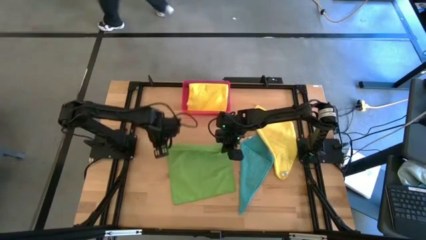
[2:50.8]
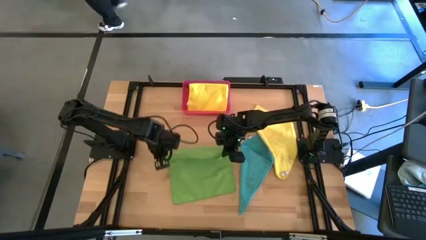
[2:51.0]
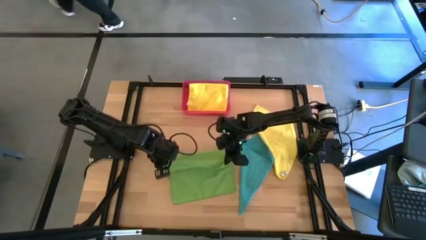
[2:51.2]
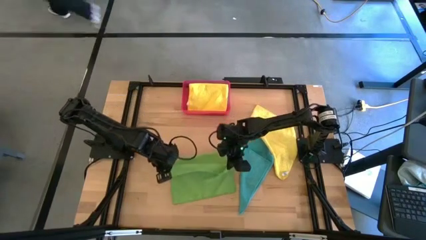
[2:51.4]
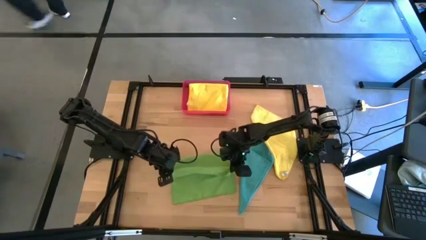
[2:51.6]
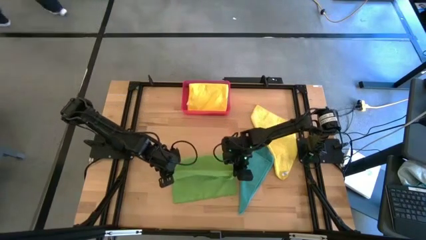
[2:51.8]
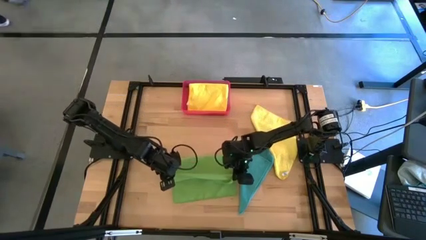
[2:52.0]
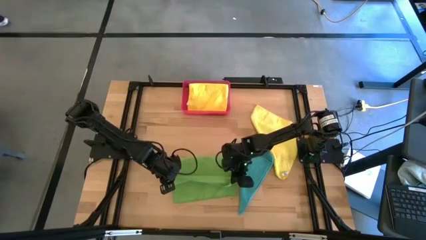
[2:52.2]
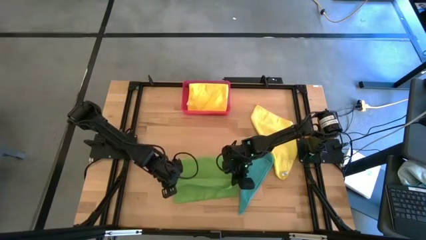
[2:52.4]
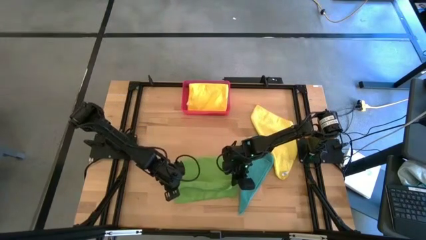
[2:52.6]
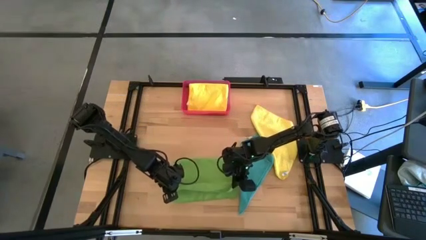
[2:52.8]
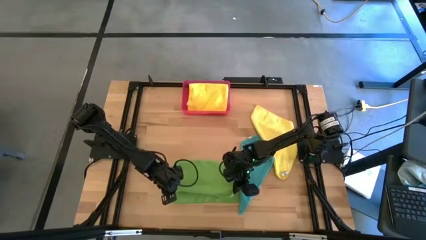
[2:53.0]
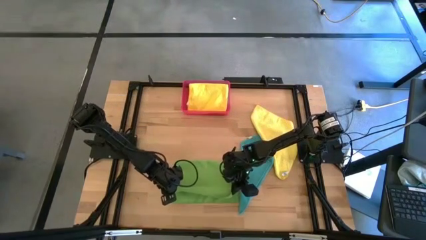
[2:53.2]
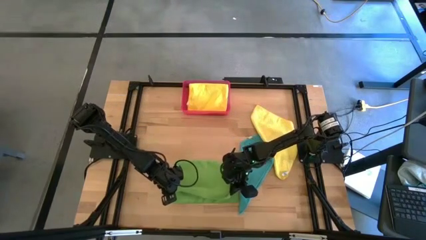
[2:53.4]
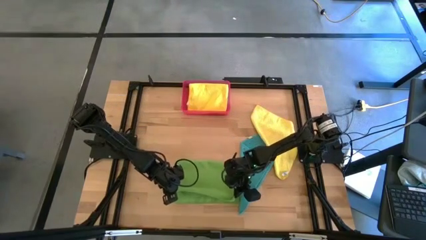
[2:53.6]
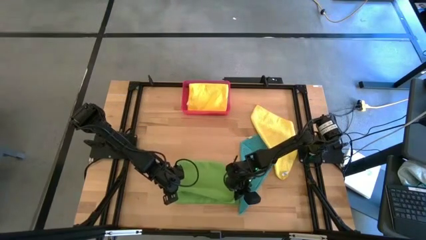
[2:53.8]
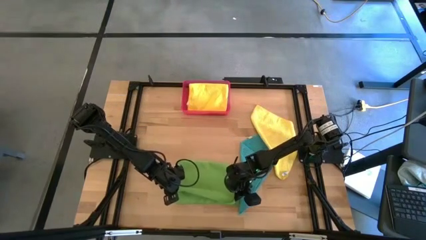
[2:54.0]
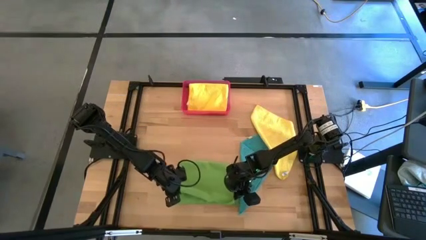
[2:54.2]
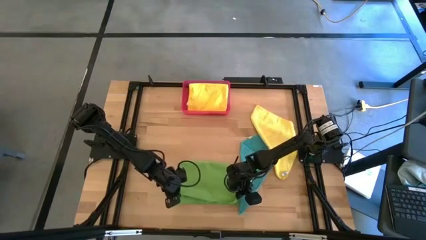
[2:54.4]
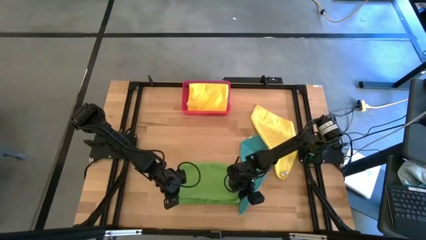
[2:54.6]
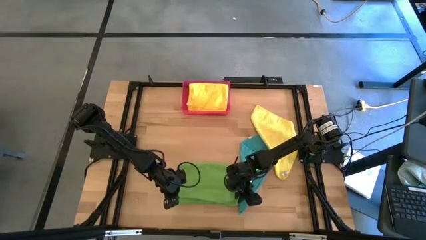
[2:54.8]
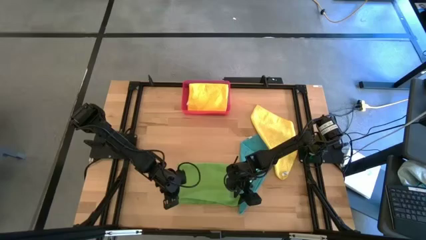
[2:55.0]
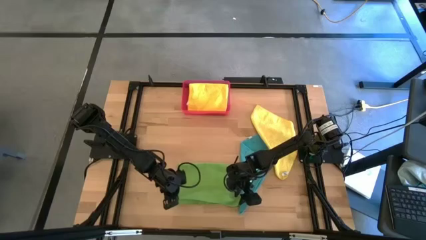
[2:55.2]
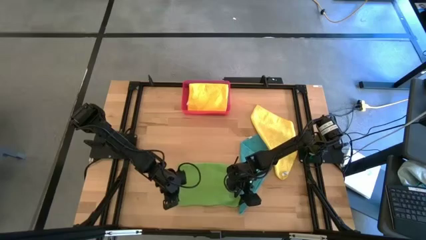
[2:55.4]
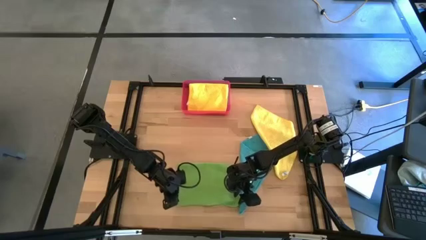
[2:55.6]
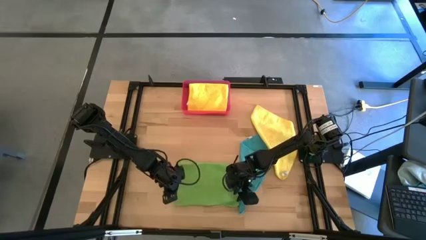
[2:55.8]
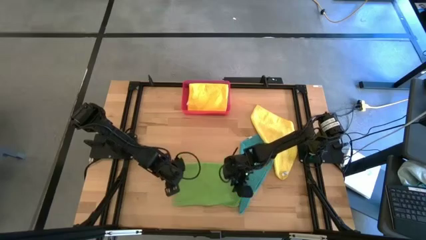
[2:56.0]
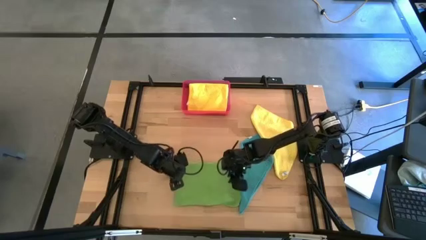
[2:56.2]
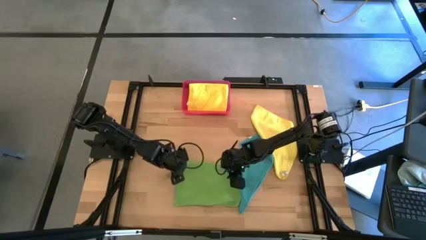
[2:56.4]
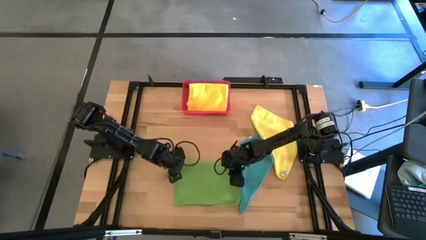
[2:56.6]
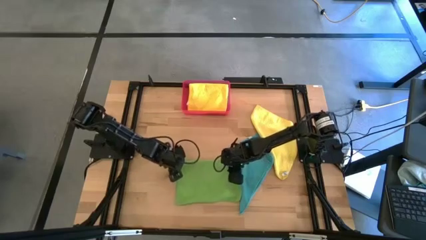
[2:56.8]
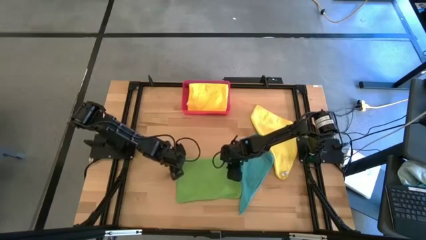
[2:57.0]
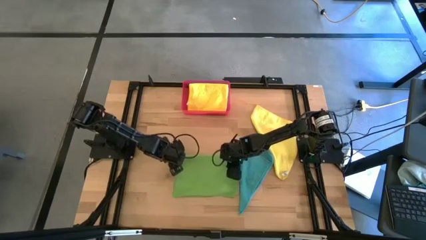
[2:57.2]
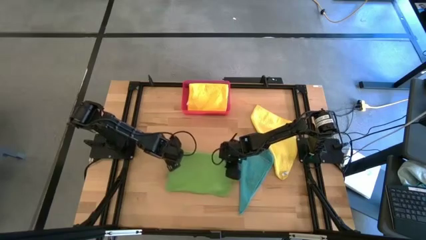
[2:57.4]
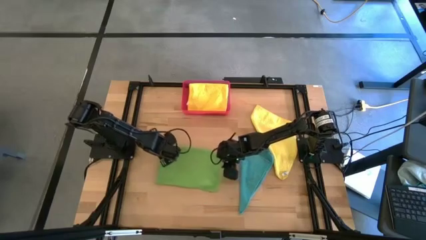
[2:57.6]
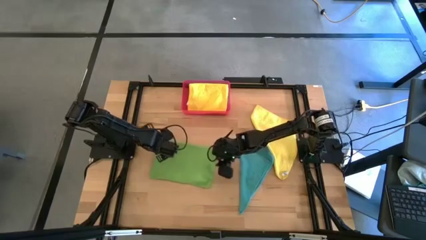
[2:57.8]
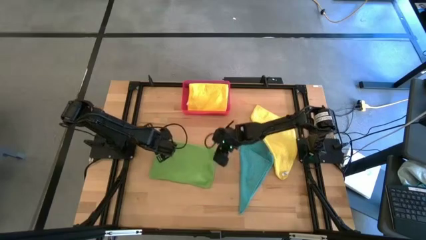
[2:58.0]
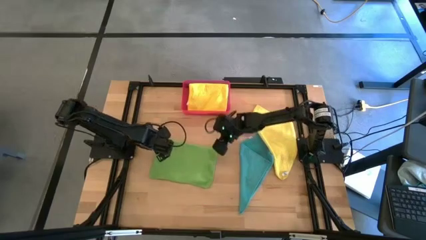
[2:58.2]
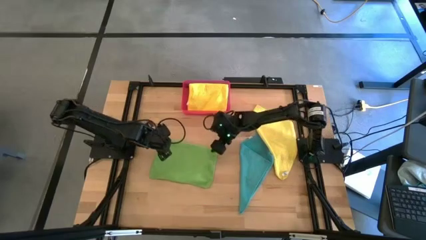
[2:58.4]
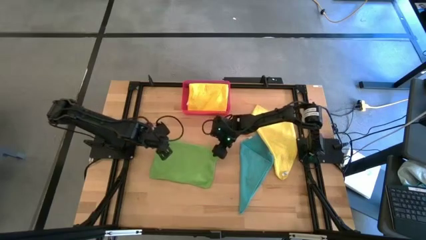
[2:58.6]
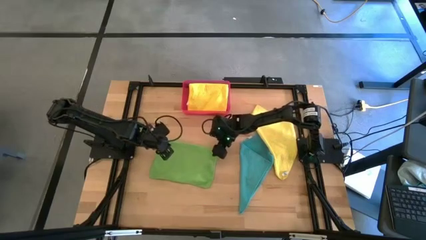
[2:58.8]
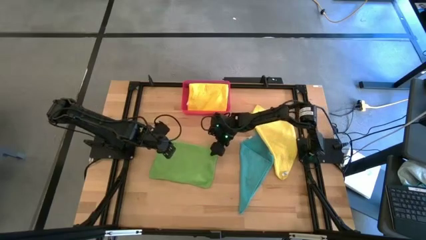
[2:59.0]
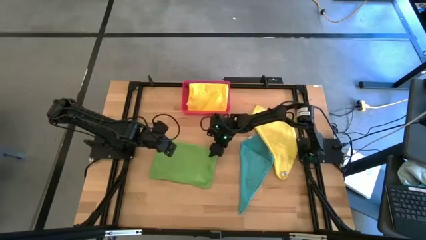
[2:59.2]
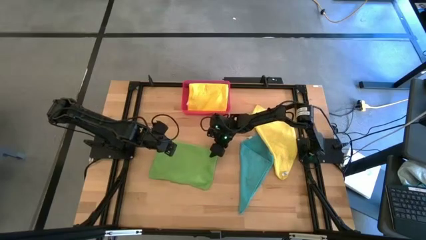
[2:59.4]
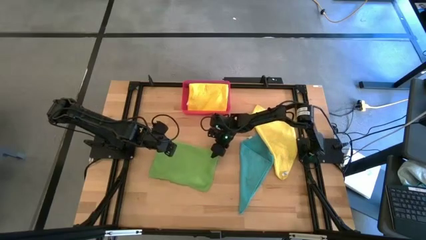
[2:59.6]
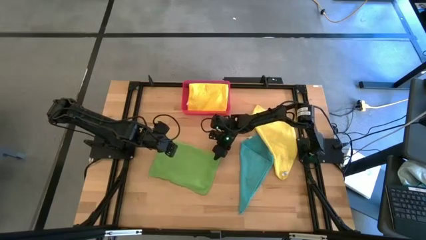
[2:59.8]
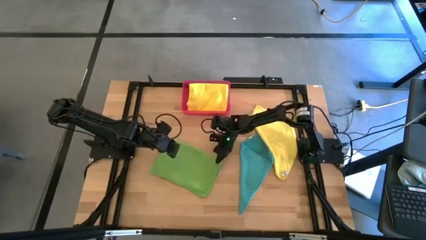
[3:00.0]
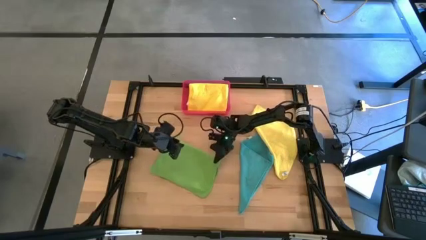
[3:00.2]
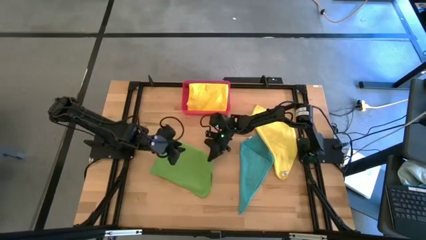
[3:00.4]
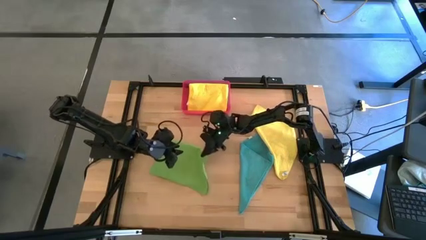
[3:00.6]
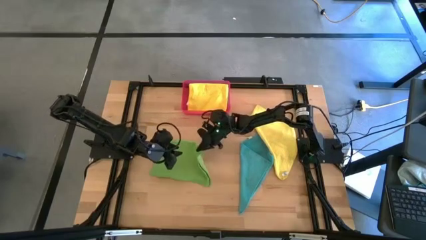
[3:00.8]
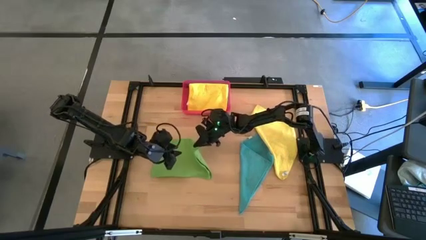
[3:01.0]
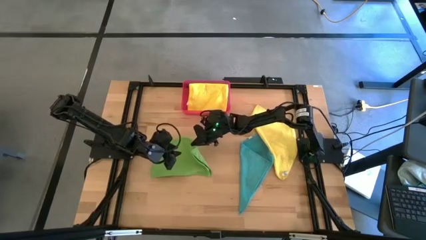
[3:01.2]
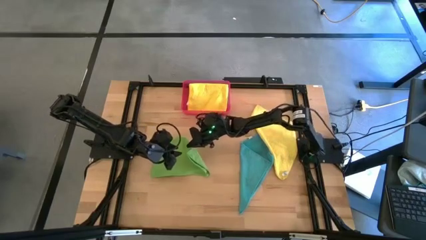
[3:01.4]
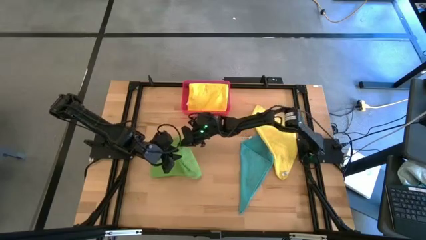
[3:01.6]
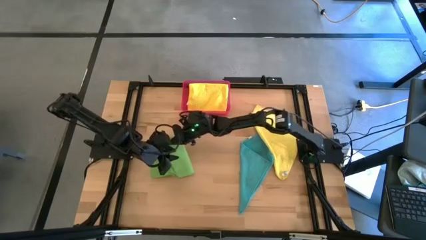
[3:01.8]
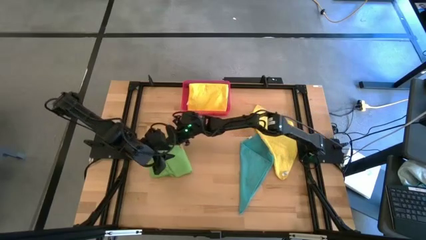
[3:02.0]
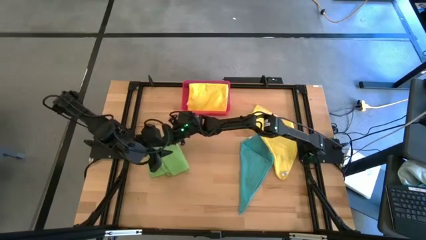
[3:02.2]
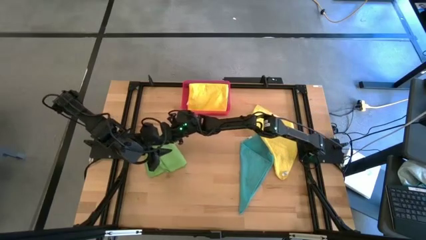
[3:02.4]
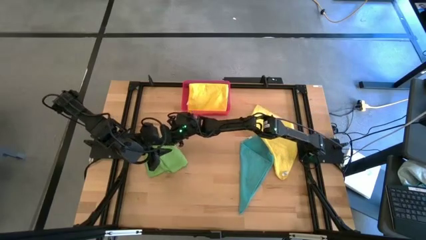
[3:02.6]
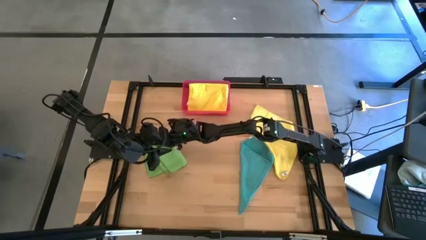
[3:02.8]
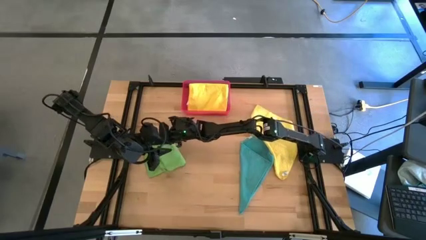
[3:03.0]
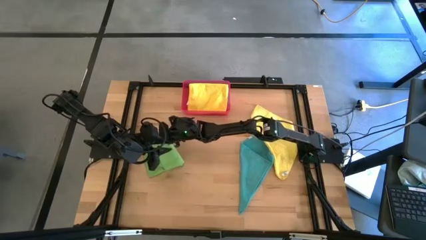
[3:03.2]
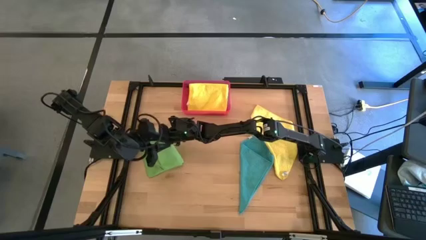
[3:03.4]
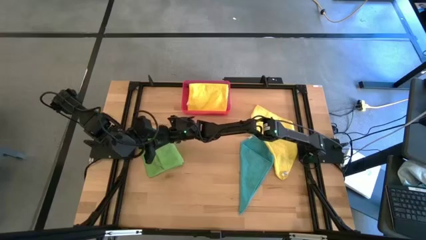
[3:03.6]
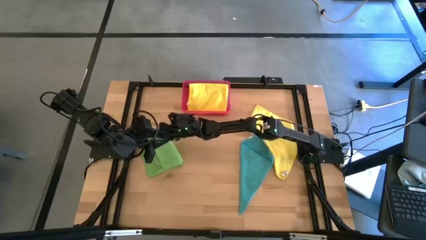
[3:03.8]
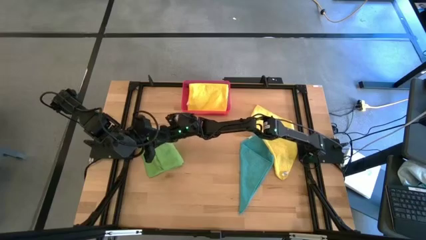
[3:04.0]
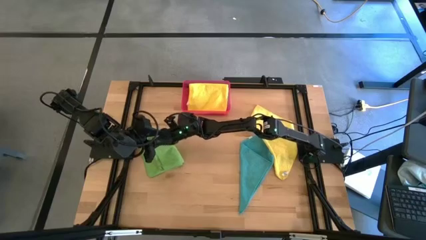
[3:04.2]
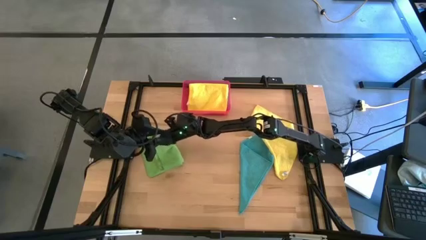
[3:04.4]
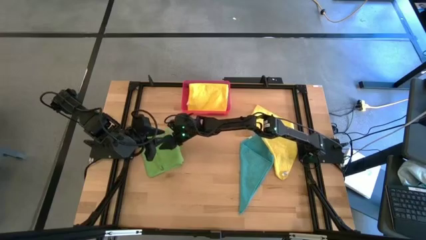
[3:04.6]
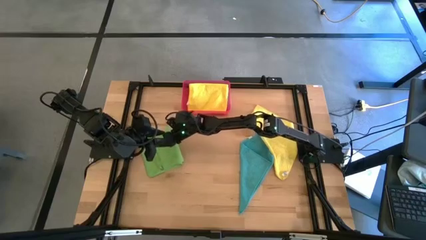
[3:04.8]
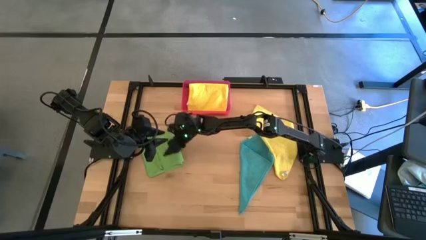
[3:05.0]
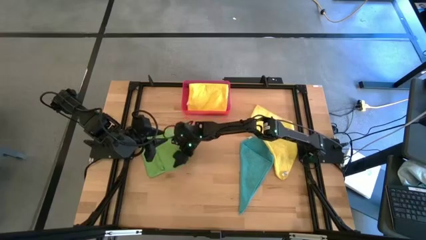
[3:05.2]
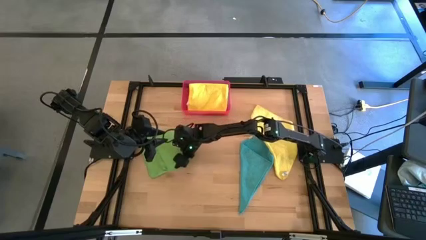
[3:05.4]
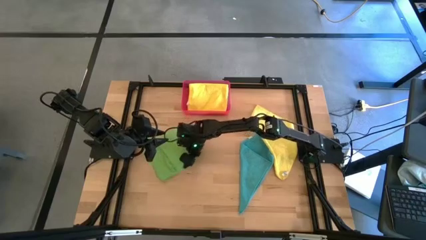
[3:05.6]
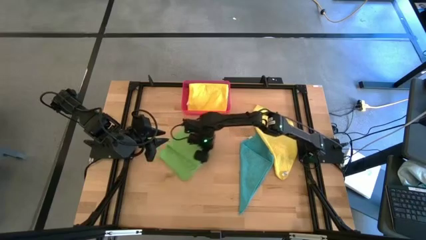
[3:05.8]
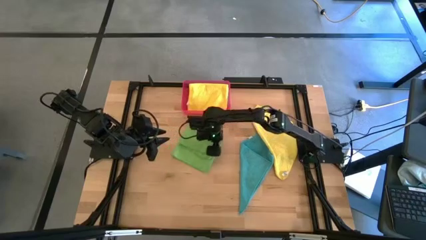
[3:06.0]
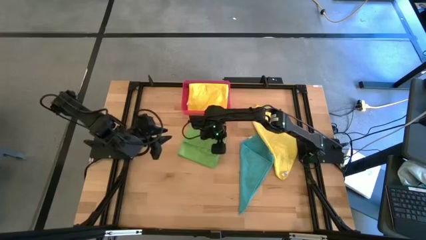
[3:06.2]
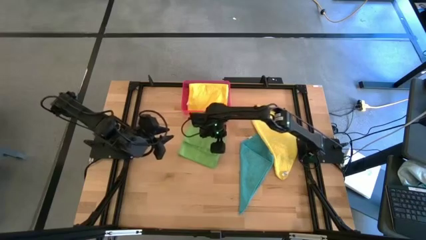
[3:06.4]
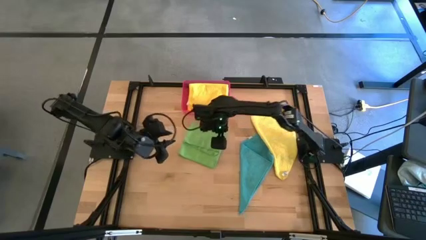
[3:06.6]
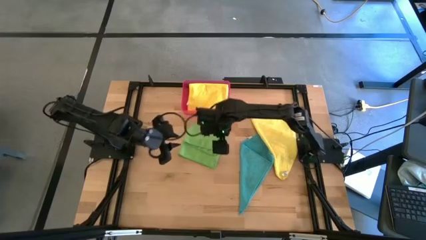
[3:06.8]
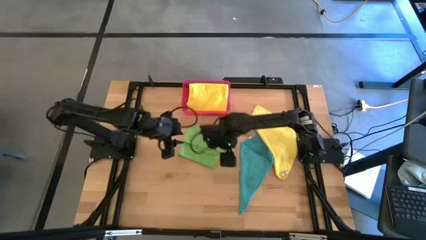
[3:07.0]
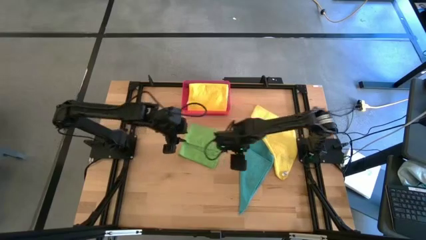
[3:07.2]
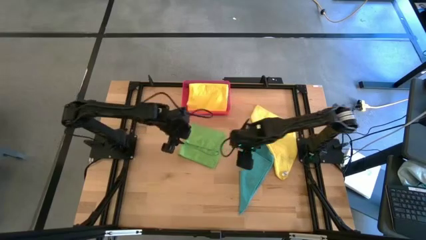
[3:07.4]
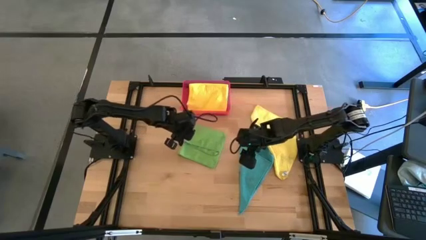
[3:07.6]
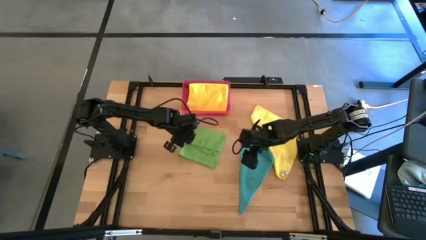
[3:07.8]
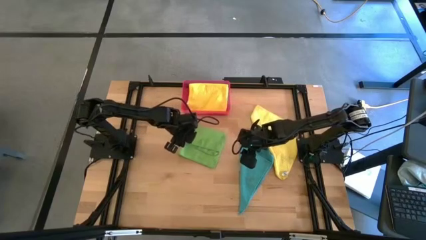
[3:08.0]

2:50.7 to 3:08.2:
Task: Fold microfiber towels
Fold the green microfiber cloth
